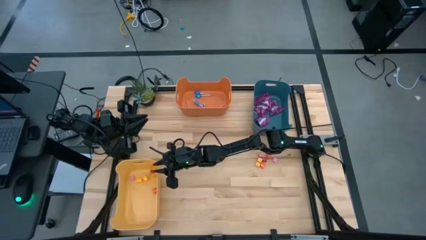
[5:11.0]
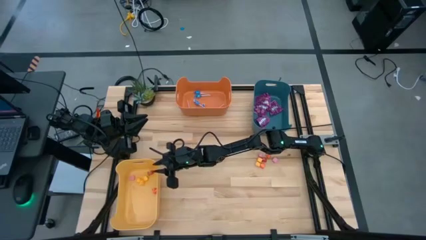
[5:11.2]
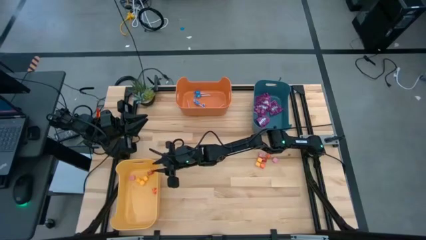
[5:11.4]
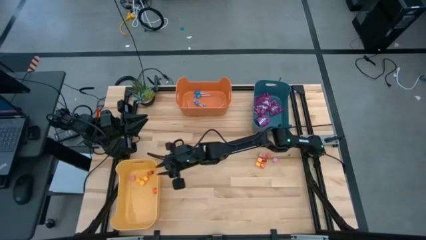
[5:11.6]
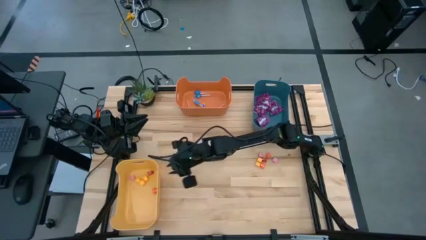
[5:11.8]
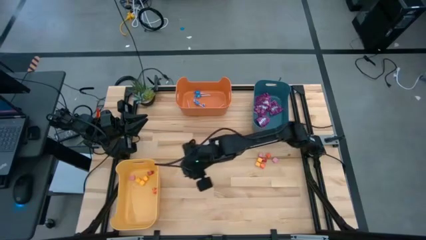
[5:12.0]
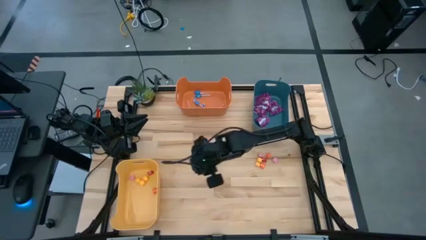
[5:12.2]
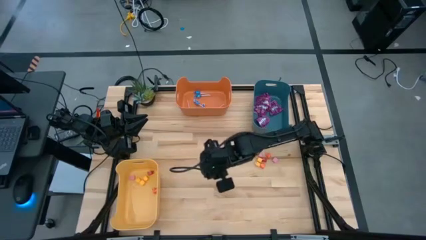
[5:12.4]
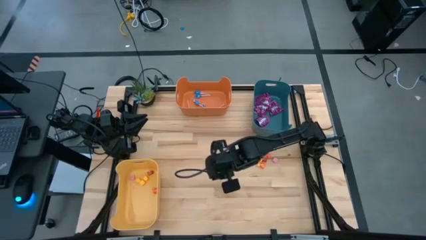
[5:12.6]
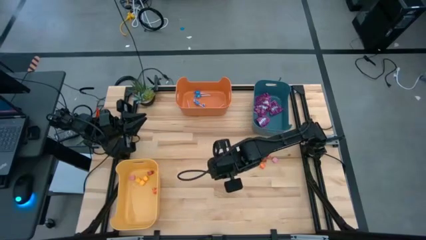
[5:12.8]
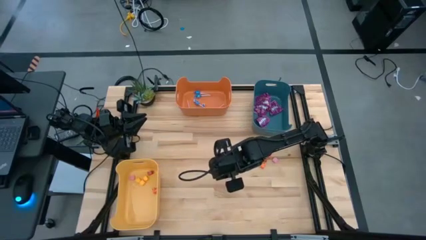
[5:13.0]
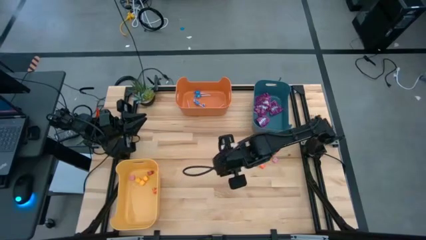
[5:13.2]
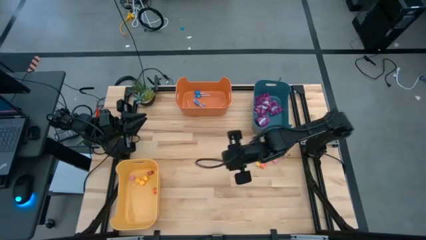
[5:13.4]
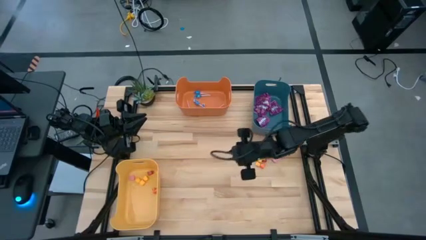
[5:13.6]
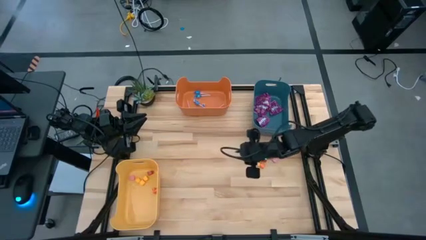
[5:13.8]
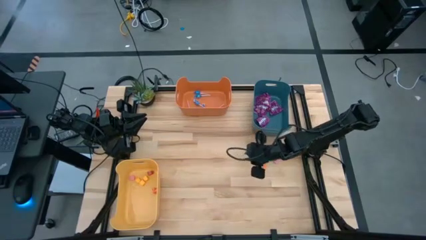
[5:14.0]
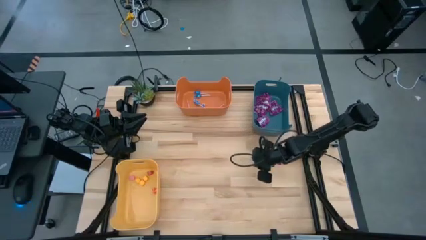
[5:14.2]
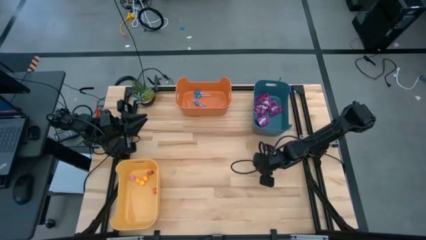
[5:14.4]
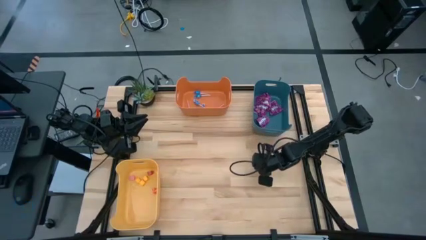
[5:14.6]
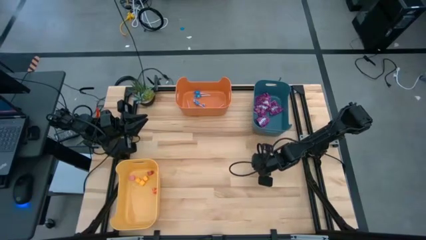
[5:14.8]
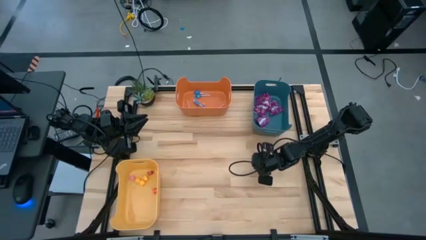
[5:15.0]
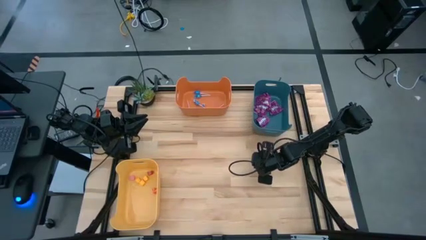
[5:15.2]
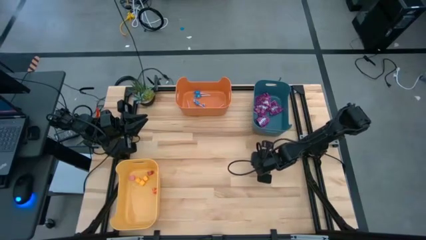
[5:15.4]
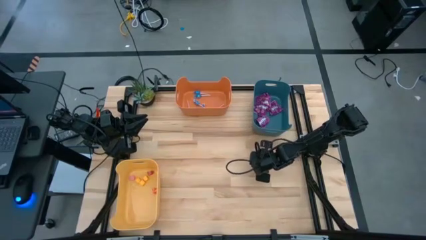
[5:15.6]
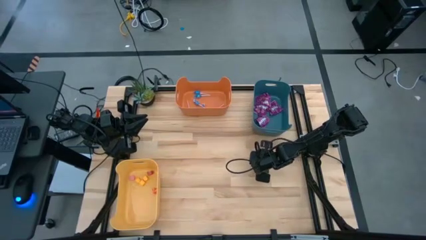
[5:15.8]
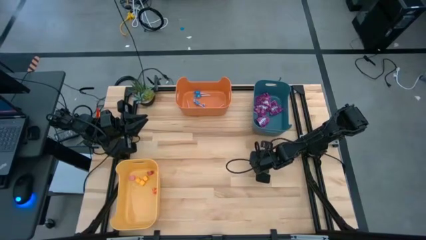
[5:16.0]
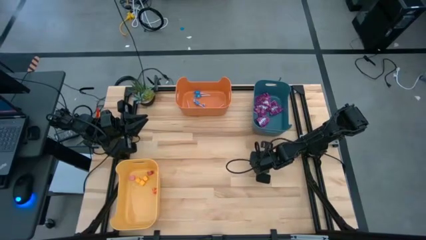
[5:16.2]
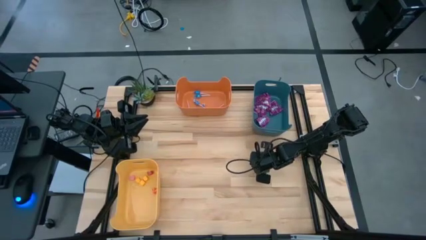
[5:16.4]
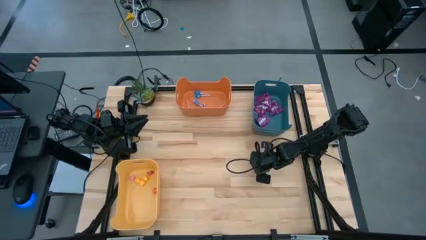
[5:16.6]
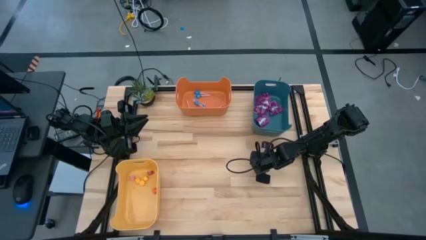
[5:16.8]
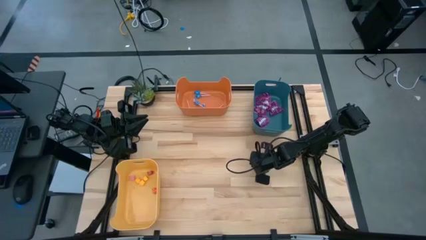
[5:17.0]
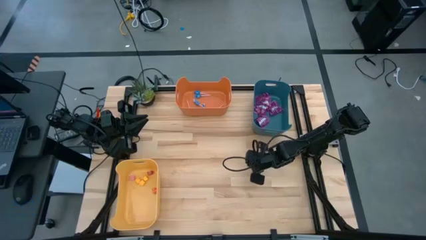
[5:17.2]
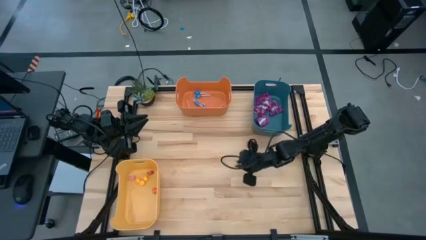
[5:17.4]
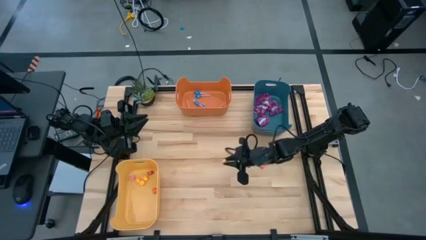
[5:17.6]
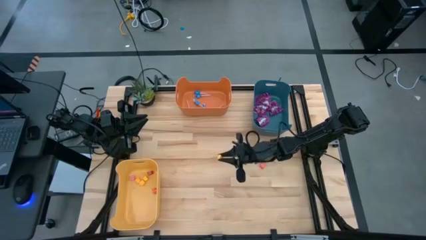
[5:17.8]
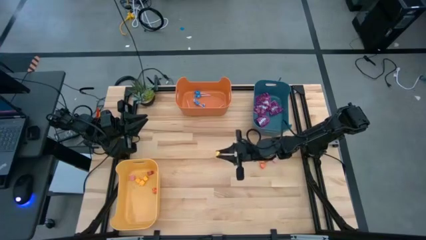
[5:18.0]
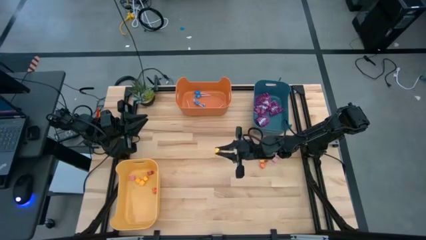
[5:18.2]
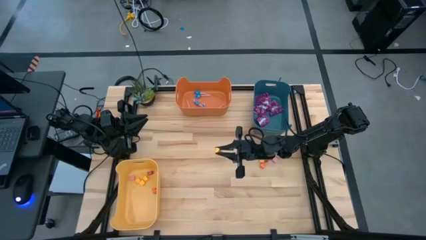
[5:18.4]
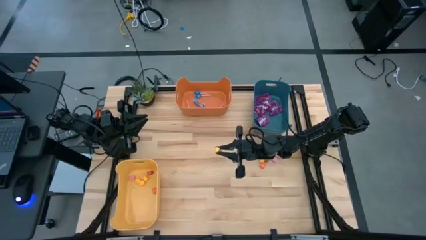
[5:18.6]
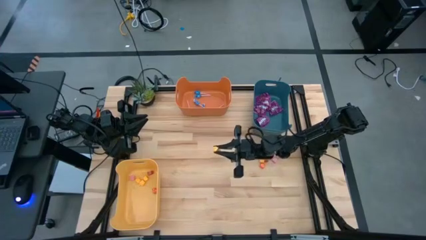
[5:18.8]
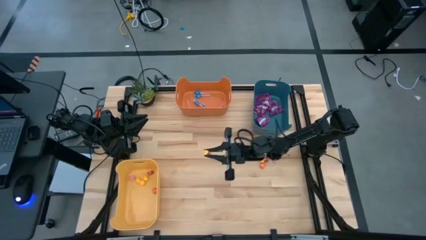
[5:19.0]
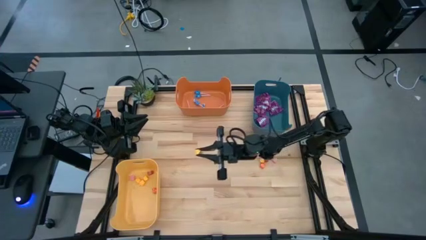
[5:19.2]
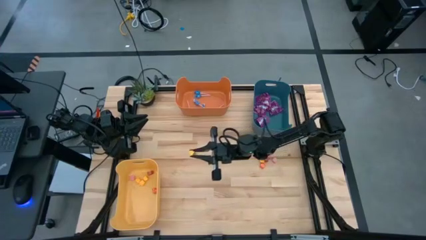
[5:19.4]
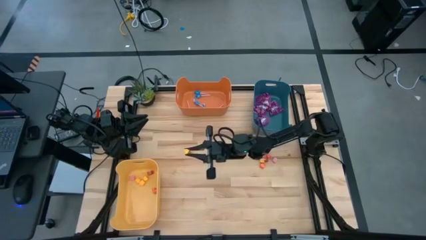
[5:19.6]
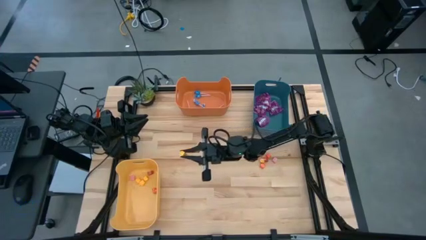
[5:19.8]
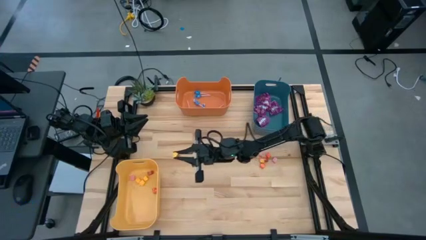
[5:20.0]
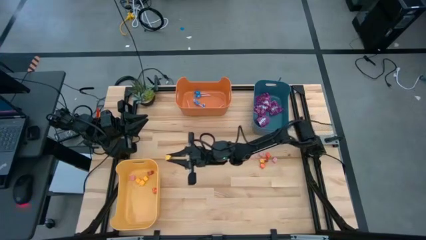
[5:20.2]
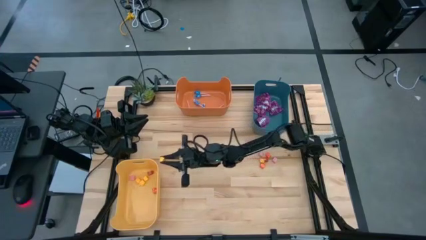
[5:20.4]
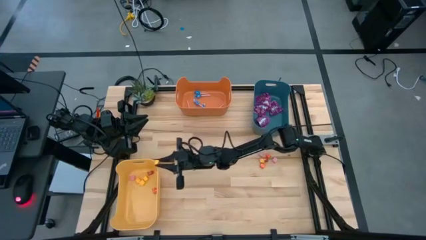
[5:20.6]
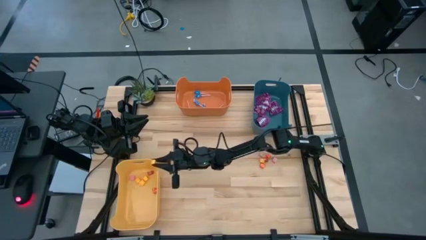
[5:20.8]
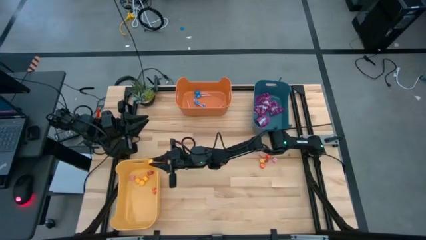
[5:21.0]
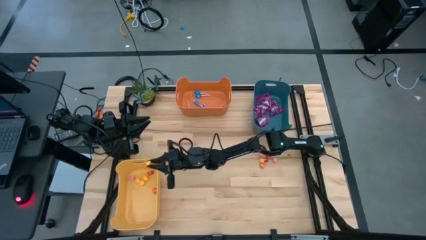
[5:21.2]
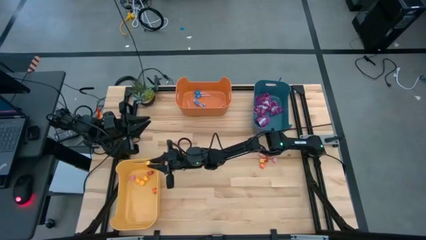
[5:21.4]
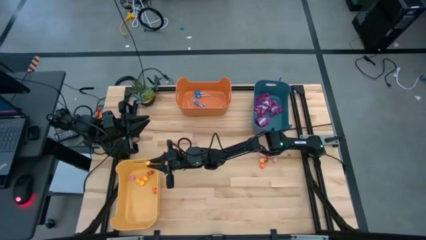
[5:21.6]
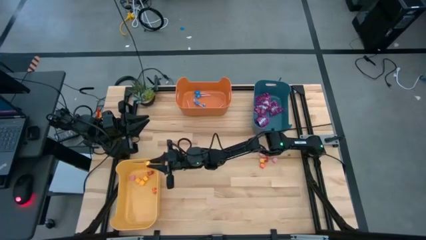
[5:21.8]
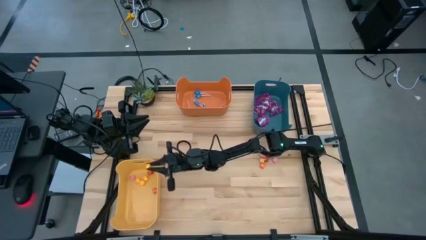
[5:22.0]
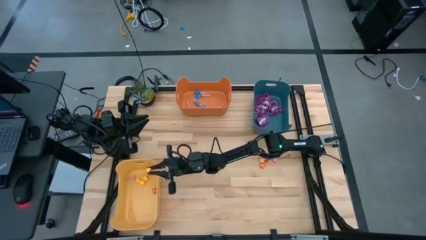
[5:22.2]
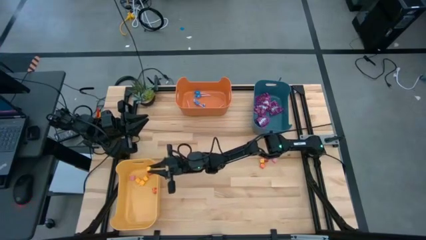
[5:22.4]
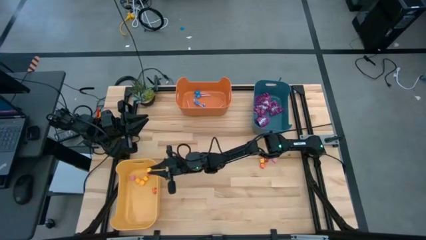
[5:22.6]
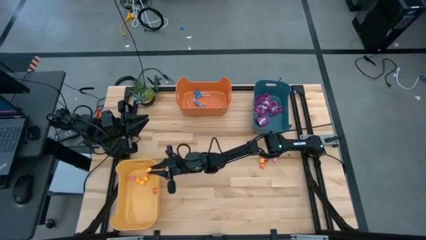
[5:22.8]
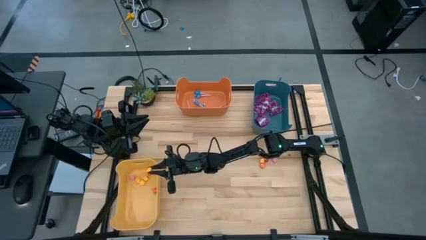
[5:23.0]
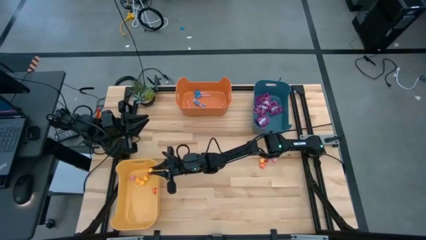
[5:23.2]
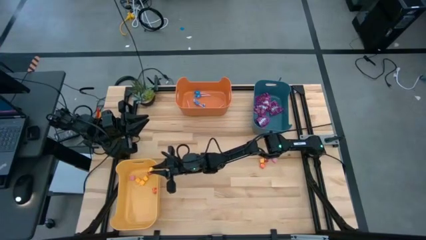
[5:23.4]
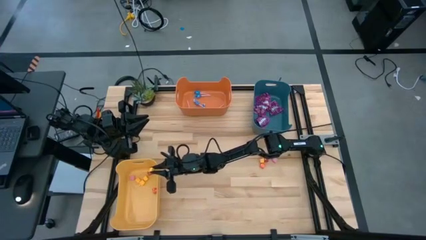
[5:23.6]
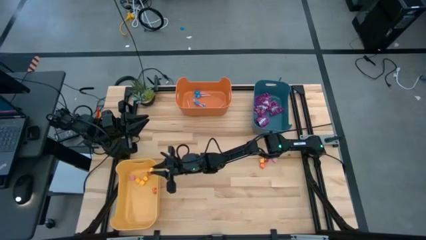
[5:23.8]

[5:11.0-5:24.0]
Task: Sort candy
Put the yellow candy into the yellow bin
